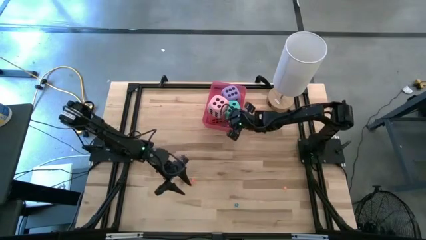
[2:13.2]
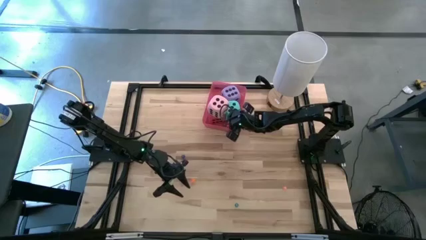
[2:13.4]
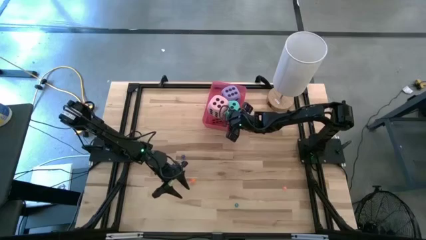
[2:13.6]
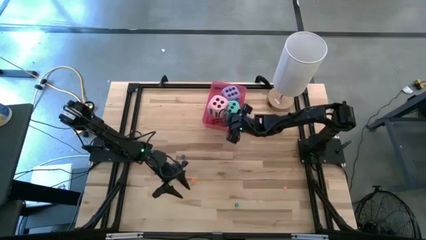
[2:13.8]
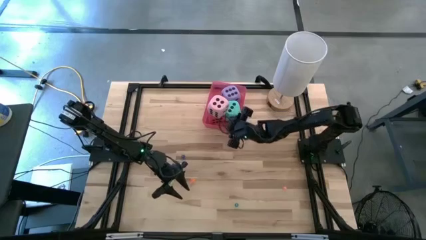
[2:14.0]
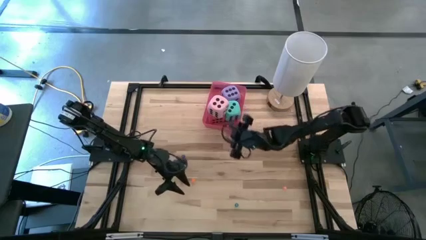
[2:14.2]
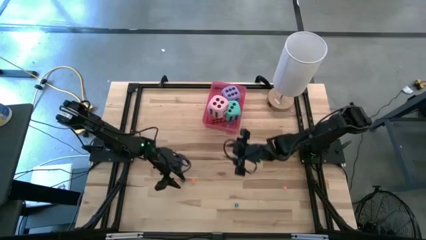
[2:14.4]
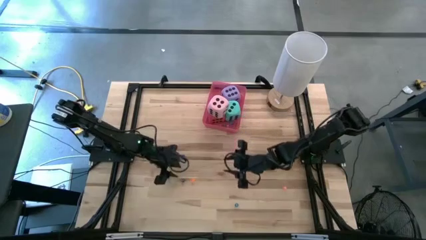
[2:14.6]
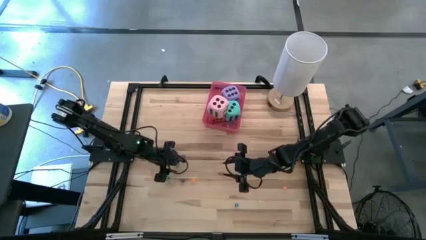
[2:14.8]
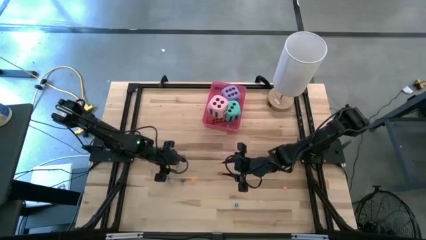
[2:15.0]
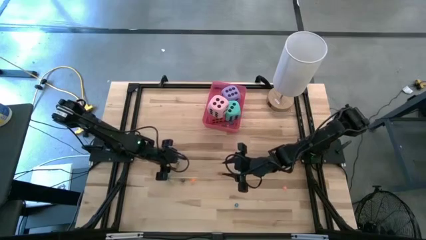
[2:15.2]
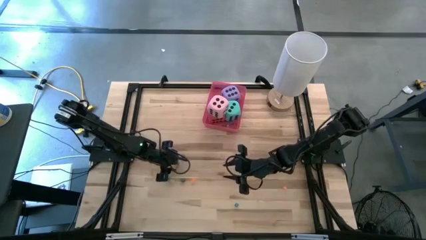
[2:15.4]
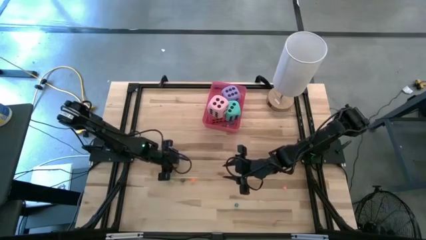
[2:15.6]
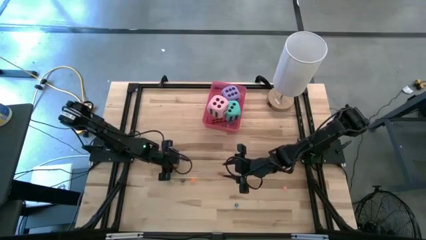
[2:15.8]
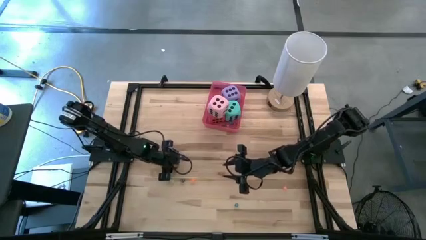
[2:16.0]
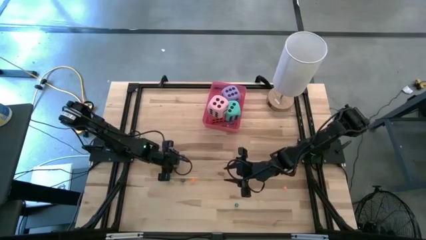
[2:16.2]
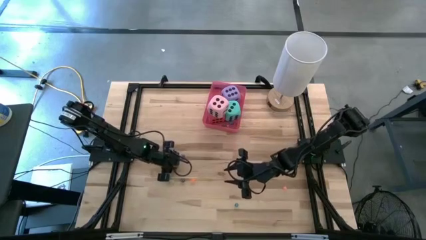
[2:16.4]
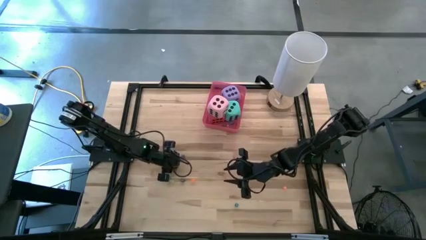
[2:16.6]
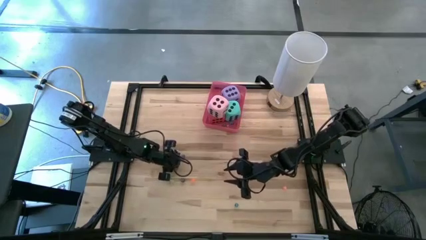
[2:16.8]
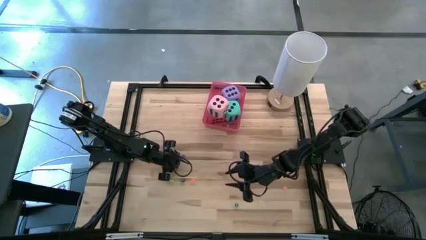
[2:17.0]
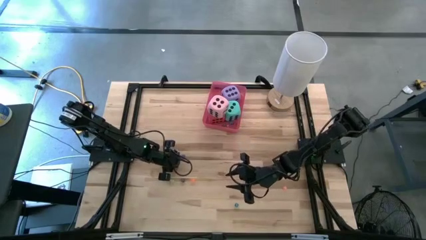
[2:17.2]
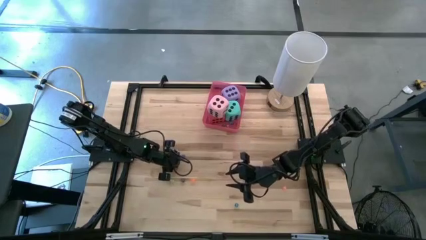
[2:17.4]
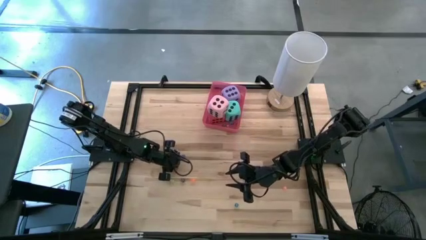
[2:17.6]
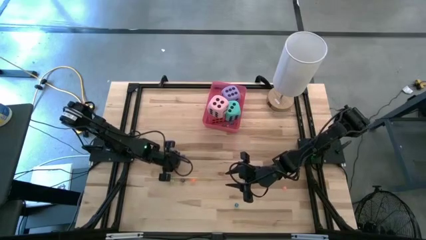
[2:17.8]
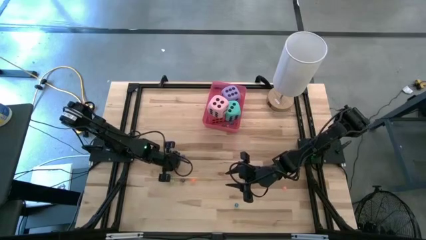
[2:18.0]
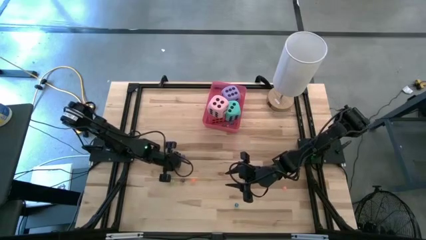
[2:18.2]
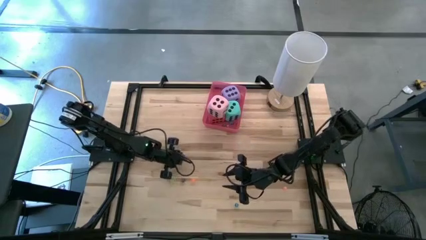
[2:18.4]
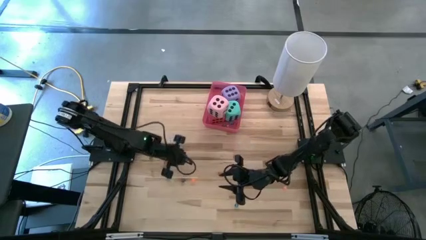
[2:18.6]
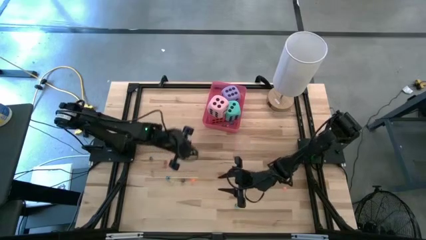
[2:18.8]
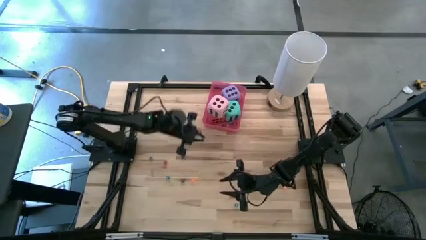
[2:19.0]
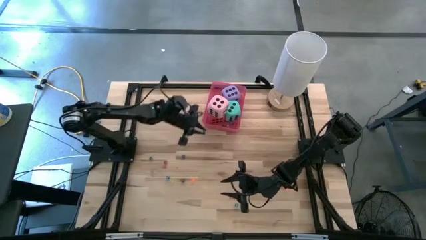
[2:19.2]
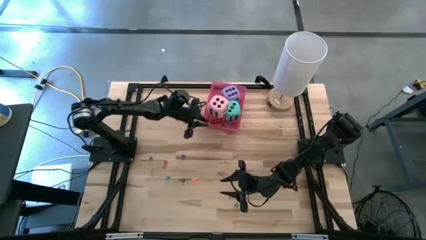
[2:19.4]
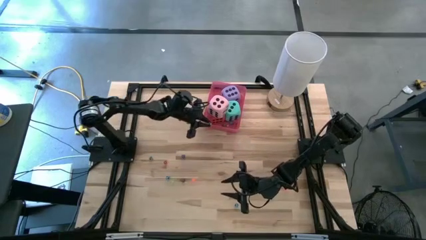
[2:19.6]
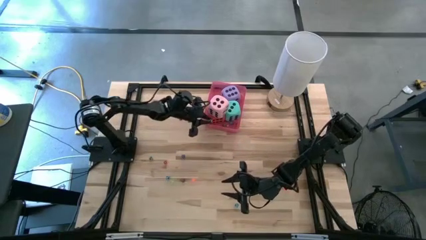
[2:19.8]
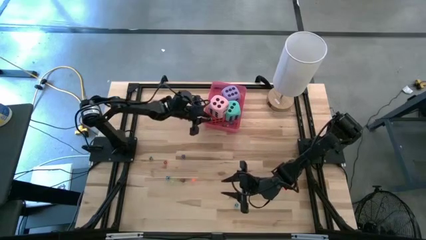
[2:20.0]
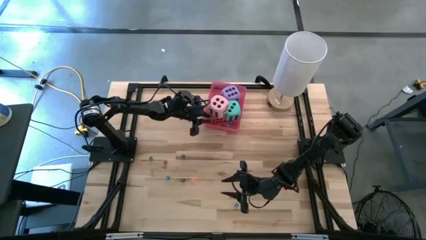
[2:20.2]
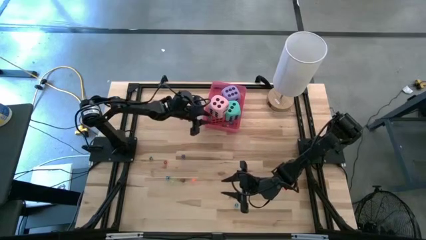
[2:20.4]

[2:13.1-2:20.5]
Task: Pick & Place Dice
Put the right small green dice into the bin

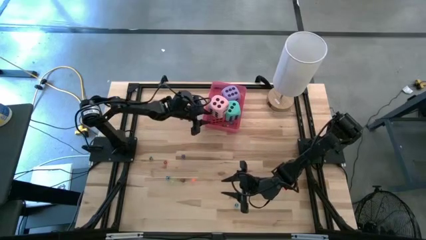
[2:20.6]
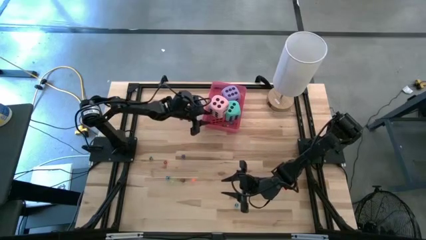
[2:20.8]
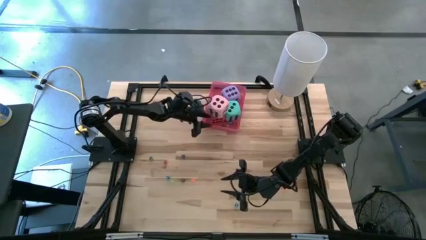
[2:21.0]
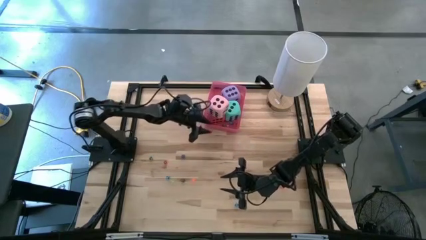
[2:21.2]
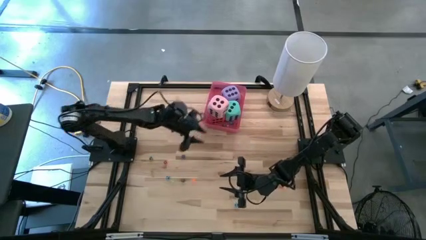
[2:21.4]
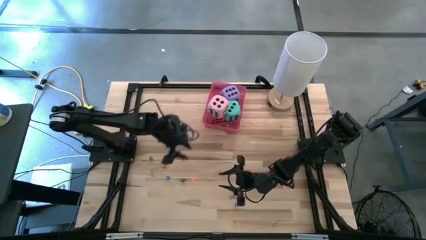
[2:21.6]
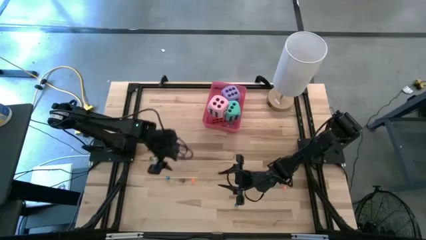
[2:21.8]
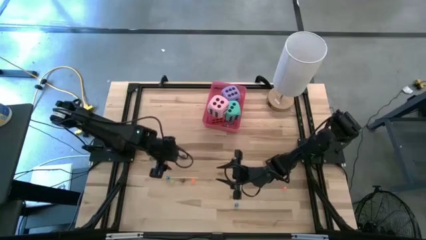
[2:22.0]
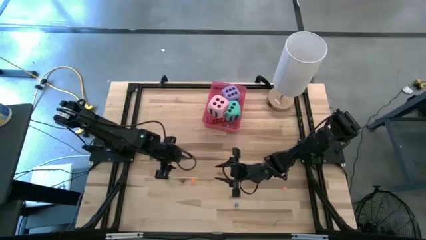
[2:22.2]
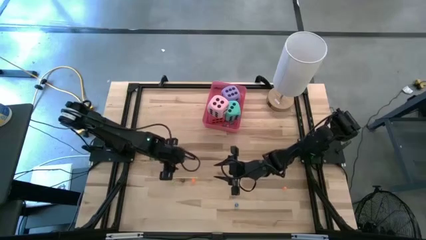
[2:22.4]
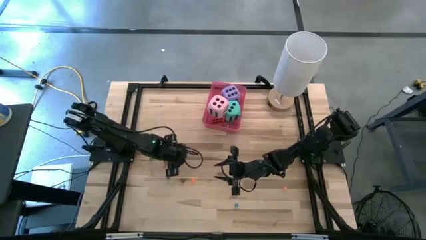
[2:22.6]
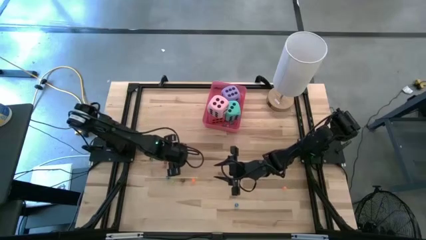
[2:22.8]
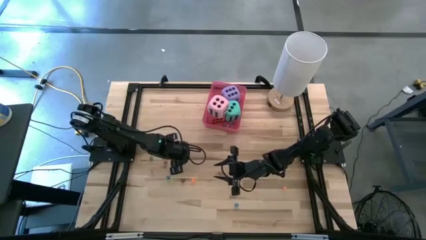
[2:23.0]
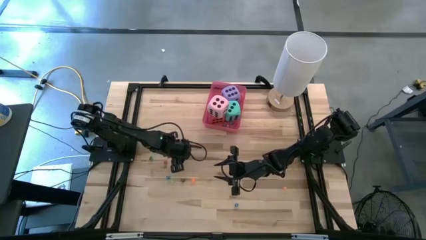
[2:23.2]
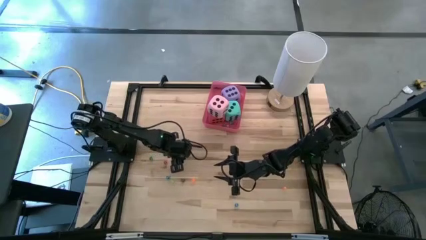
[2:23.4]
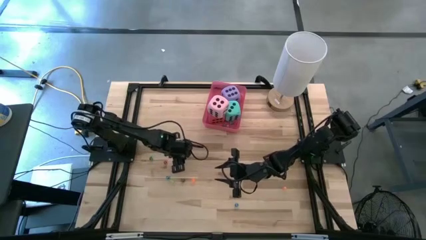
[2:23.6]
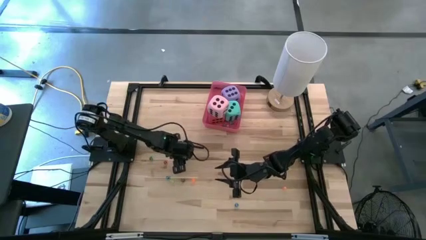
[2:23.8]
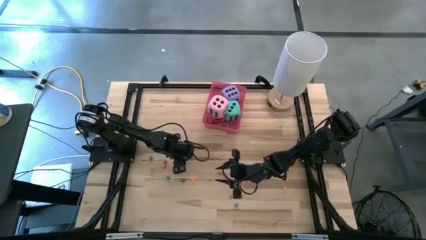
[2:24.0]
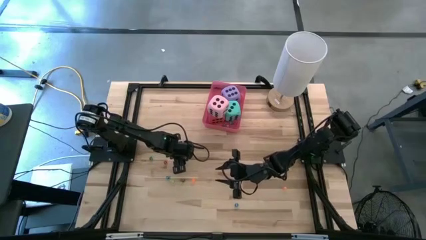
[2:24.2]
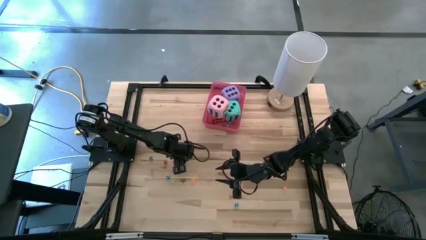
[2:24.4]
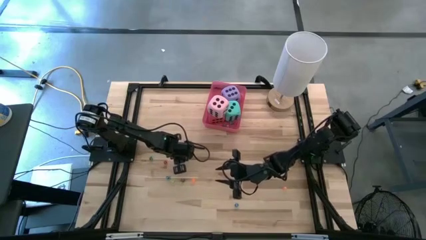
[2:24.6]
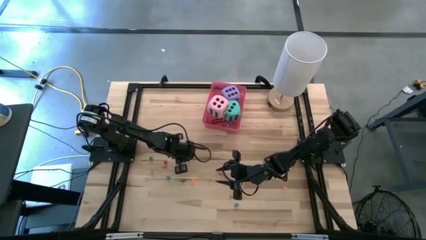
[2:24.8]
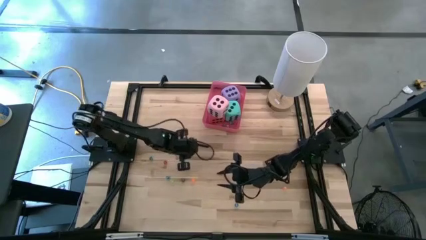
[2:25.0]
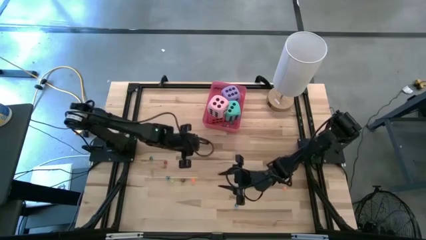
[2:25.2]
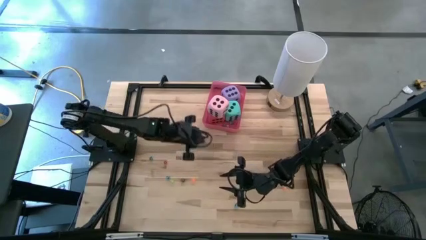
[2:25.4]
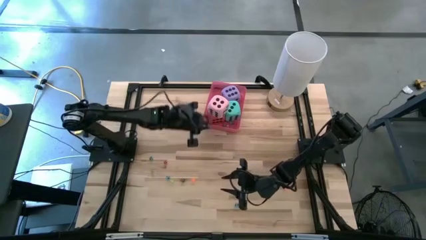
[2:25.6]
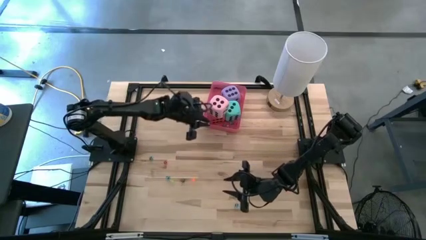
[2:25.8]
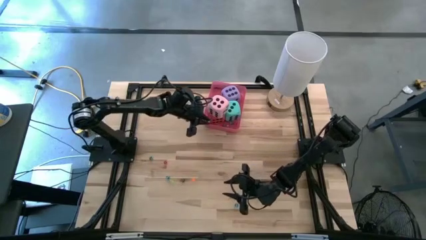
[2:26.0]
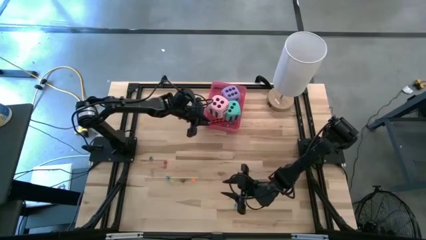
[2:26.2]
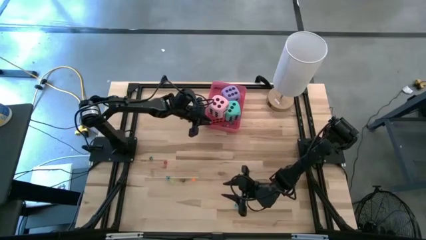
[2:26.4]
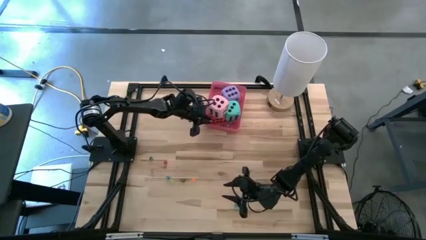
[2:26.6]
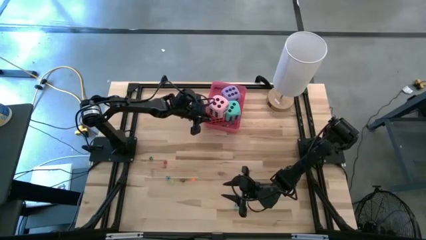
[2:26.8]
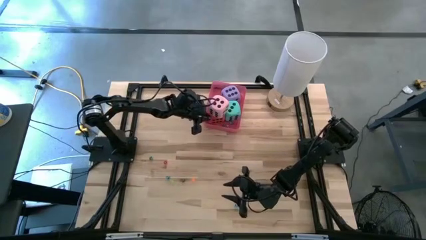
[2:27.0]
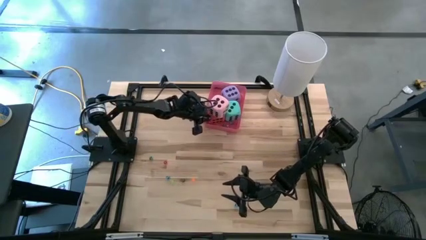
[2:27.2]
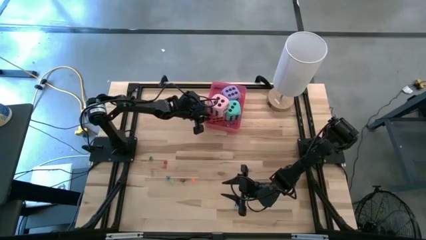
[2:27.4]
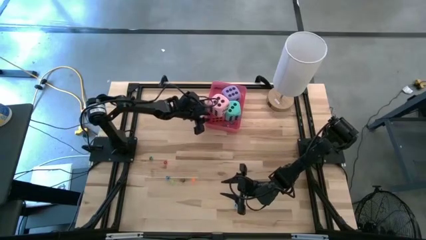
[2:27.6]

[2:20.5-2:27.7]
Put the small dark blue dice into the bin

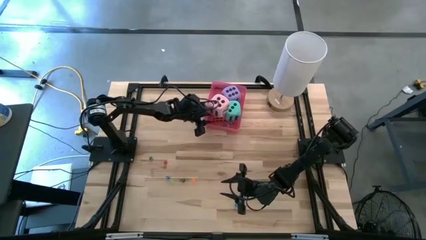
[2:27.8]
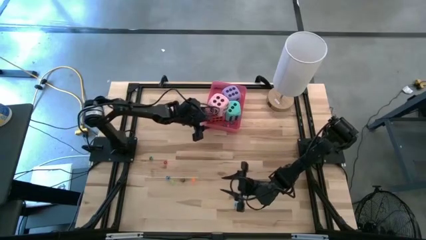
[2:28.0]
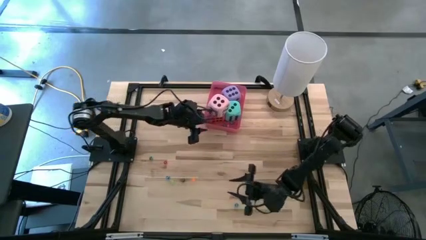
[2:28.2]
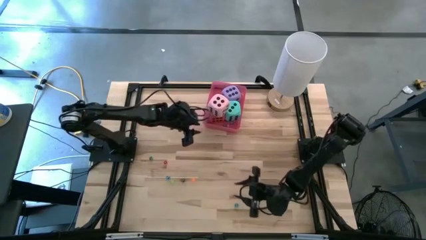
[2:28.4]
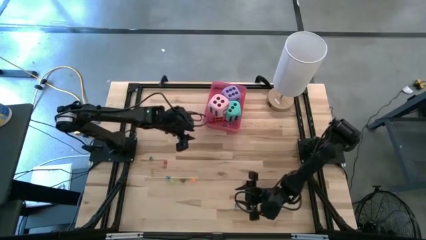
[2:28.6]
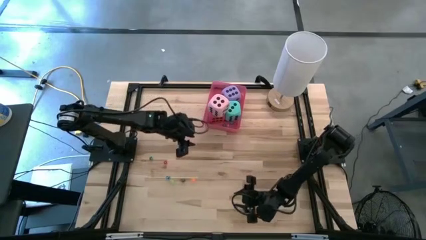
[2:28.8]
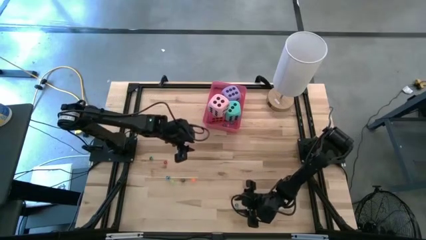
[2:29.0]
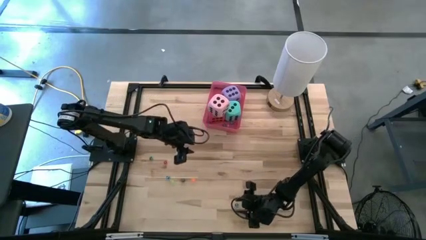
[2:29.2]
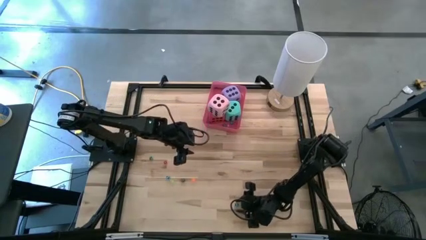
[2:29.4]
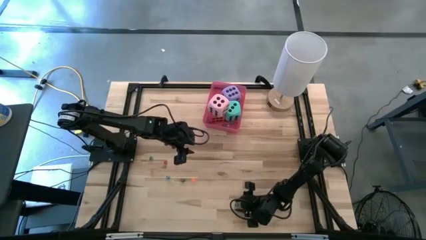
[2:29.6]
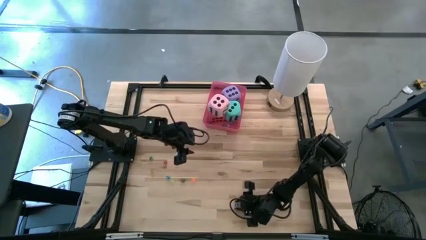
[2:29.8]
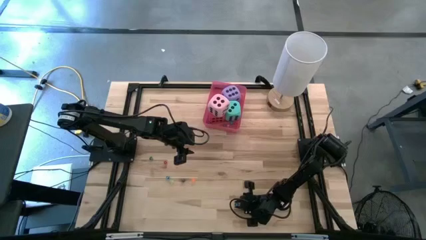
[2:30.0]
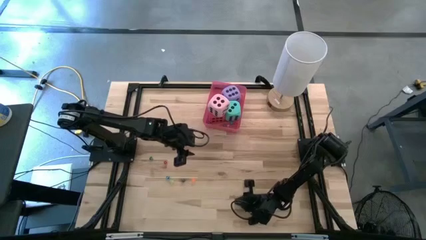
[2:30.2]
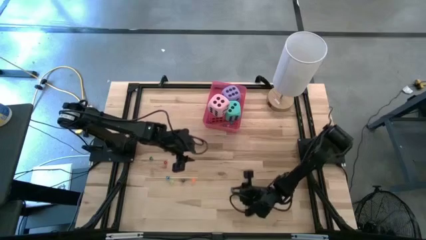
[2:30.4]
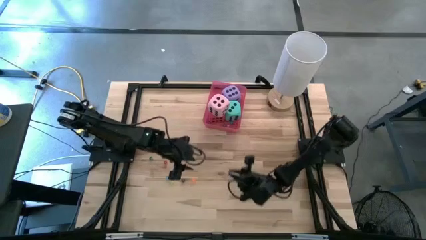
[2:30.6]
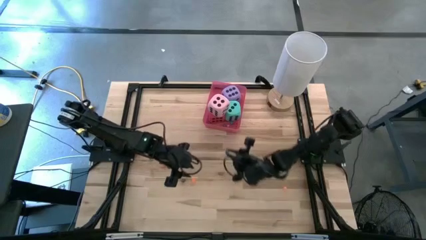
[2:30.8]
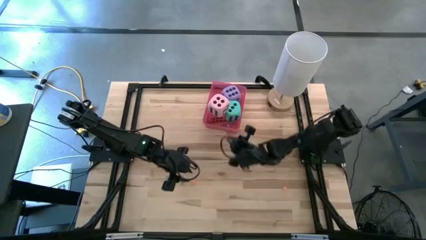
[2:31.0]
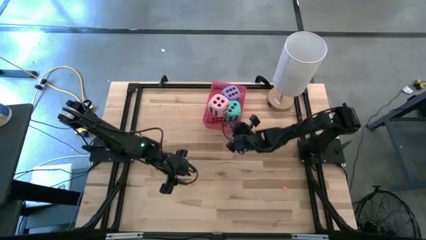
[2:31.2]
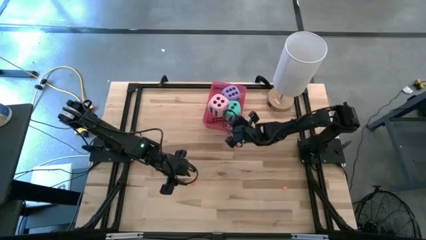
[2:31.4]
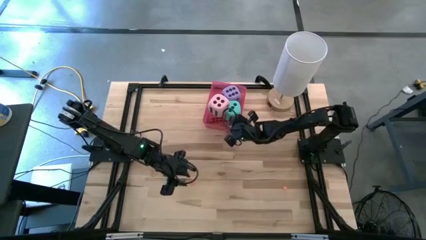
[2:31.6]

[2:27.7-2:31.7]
Put the right small blue dice into the bin
